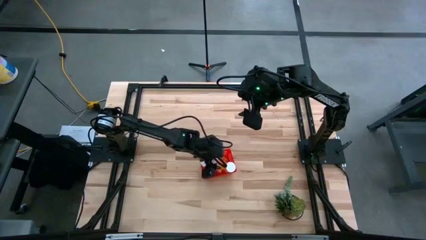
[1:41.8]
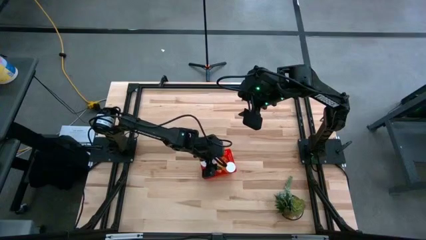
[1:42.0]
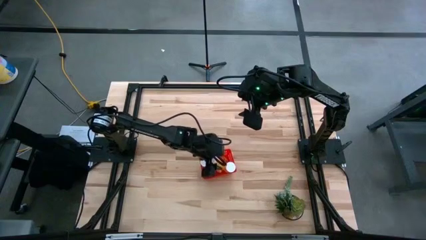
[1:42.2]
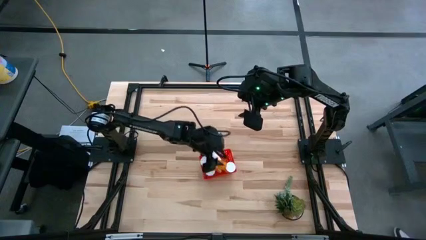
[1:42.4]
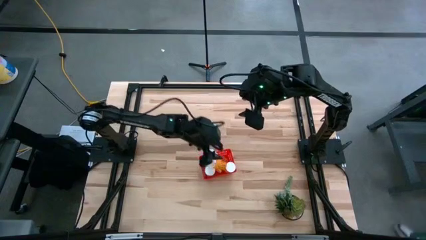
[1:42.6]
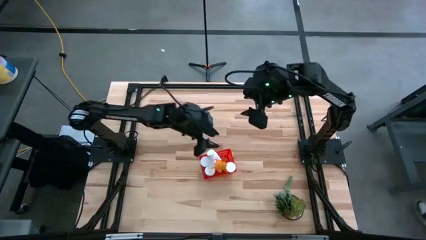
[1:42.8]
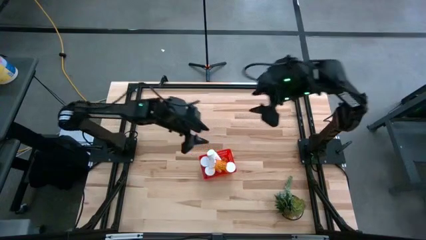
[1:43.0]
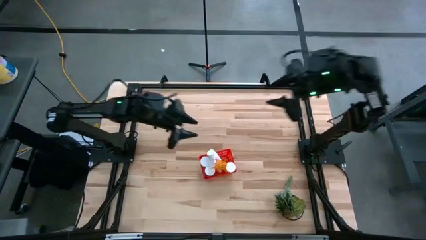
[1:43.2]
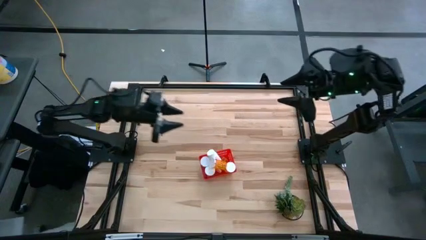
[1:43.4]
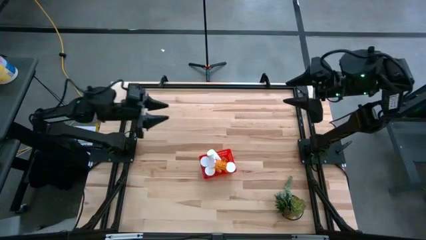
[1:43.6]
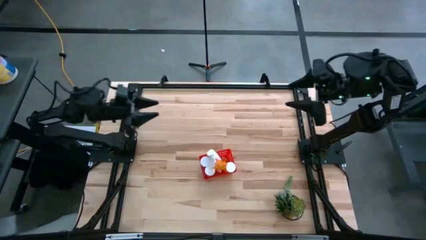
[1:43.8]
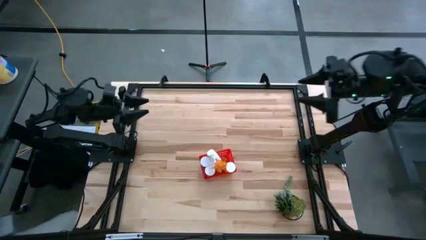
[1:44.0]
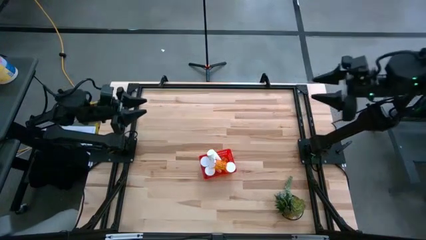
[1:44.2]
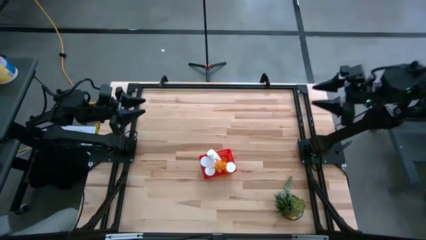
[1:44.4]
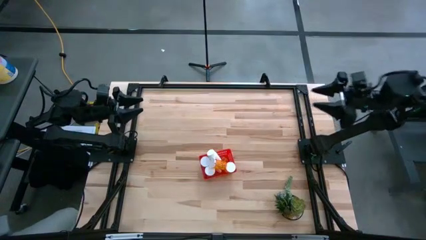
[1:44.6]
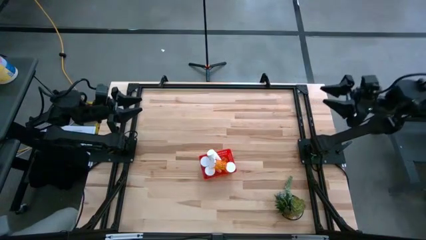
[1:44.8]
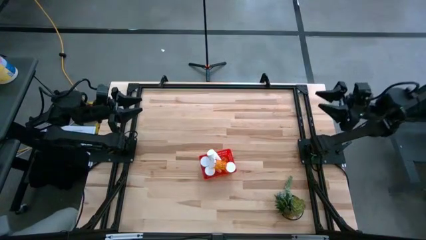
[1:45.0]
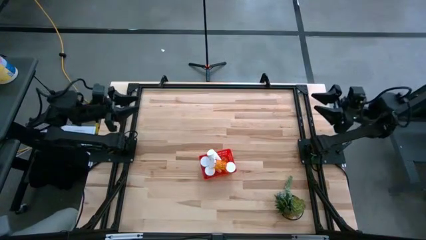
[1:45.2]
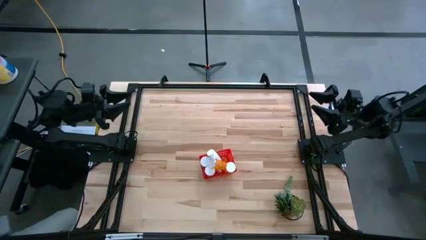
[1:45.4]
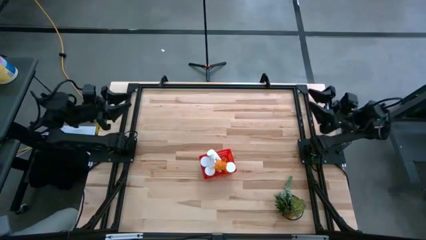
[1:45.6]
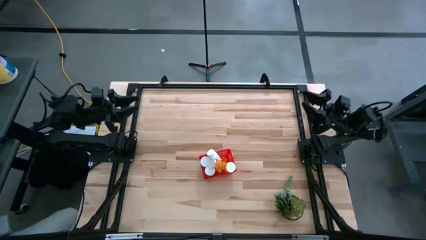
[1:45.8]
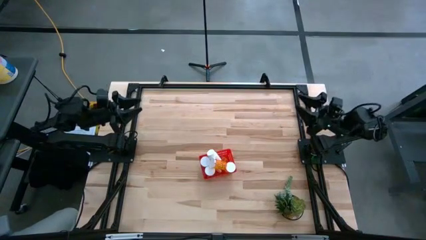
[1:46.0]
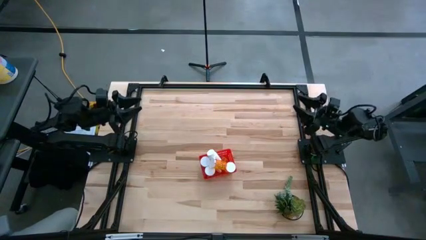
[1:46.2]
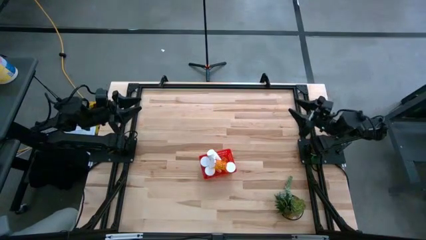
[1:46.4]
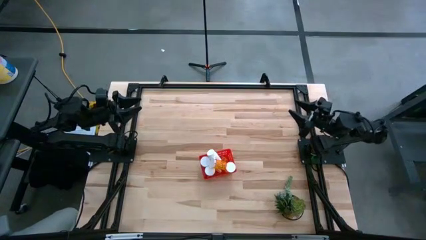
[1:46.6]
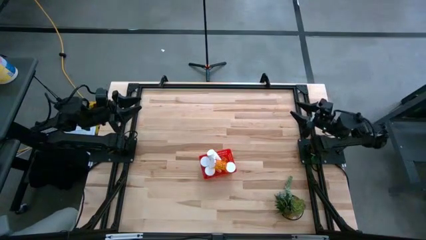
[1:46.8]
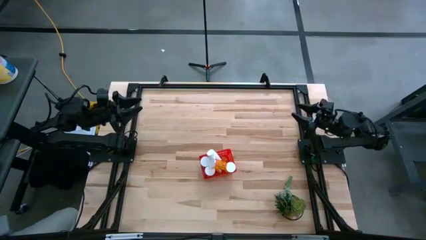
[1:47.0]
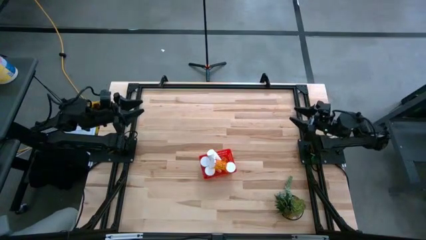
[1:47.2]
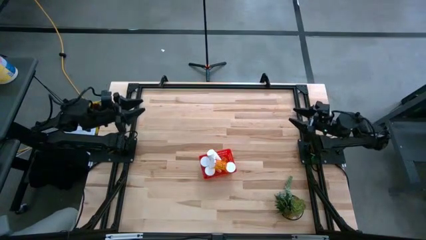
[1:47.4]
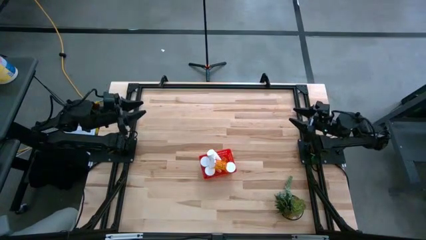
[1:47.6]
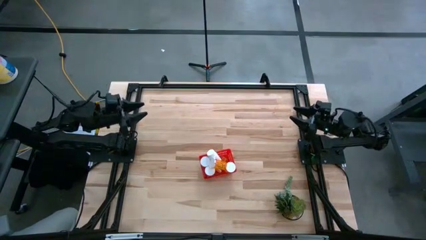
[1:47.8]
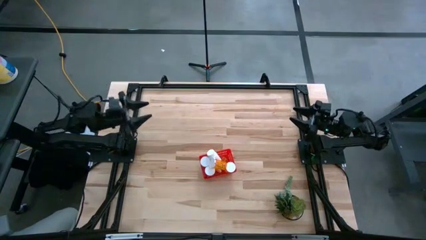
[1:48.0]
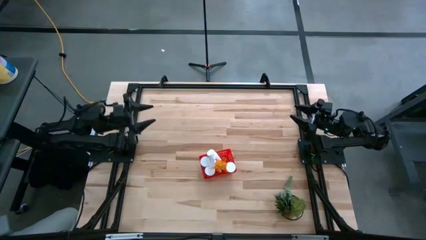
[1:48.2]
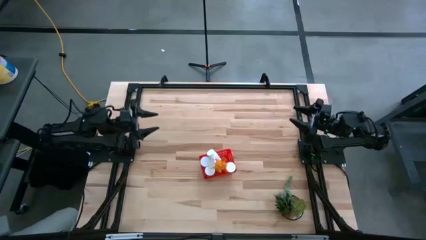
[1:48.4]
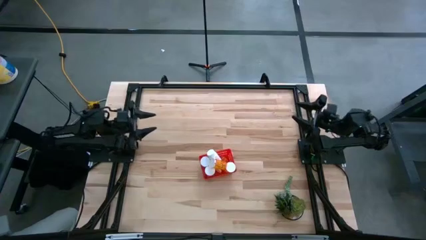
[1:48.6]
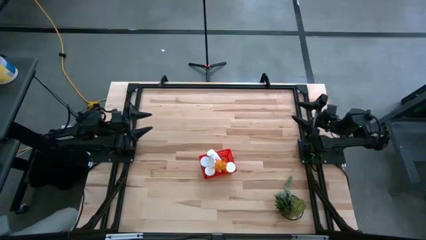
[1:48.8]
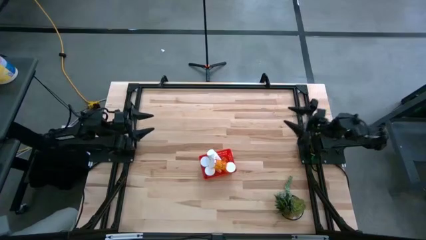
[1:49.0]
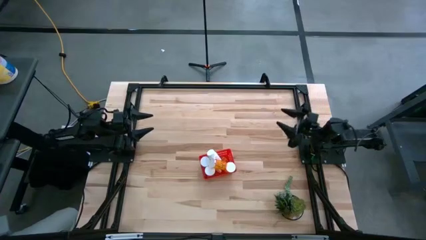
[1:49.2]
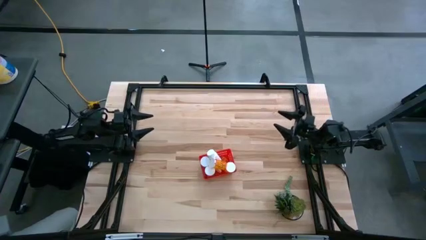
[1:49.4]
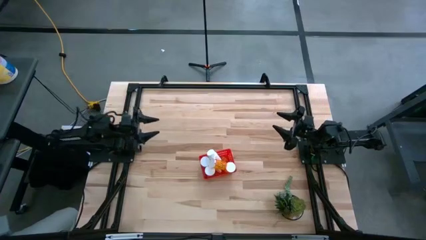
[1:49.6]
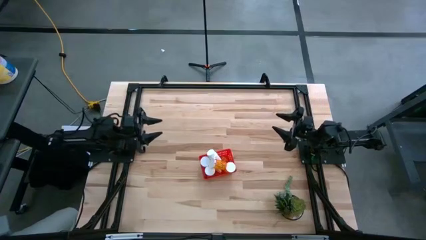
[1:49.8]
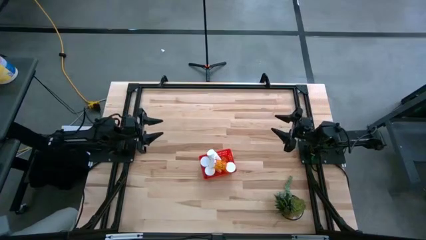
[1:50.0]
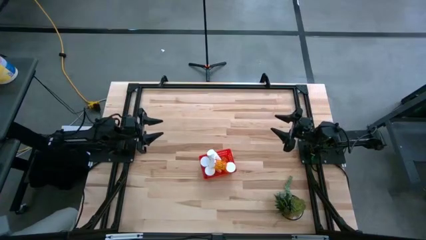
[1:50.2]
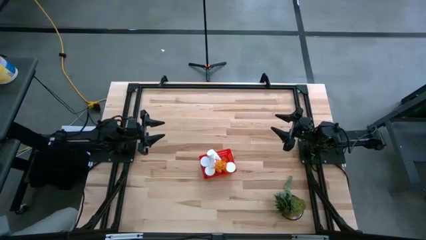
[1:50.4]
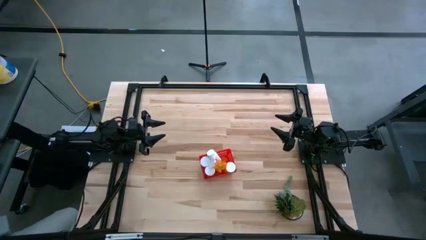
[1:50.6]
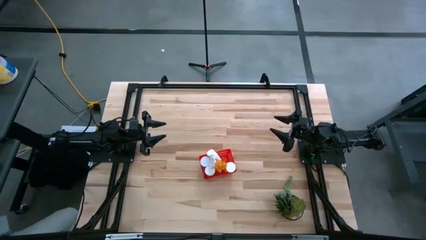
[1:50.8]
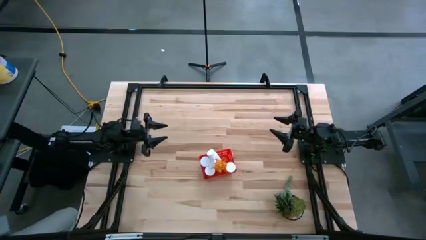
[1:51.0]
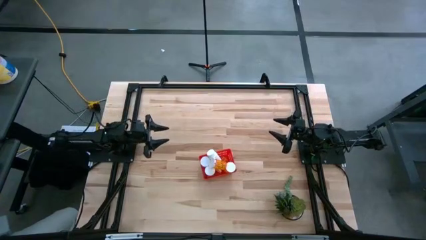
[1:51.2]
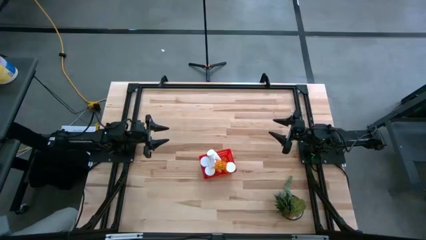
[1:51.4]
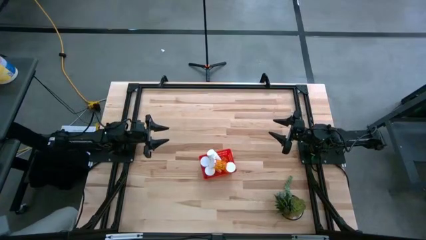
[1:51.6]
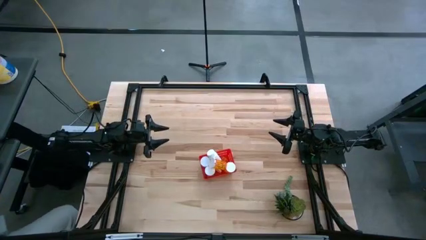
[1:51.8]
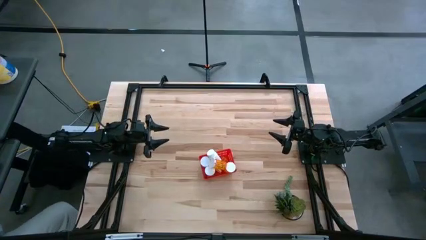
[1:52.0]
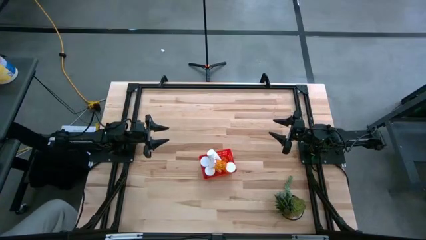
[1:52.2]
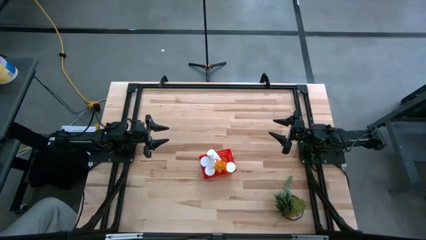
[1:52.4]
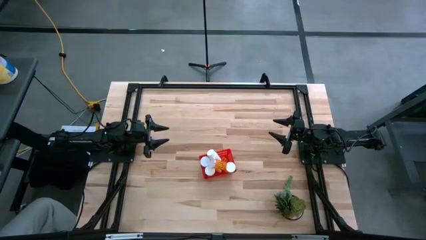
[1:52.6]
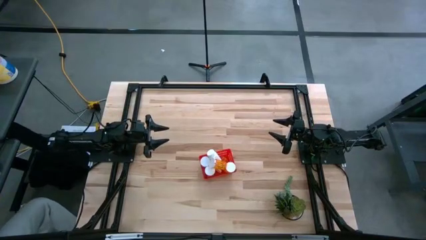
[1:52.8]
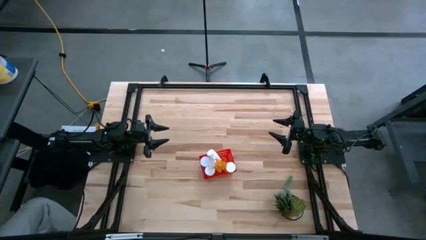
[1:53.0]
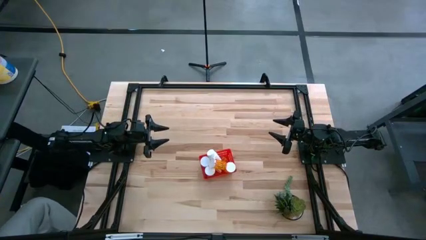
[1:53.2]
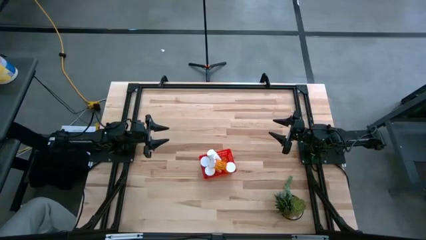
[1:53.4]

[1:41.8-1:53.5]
Task: Pick and place pill bottles into a basket
Return to Home Position

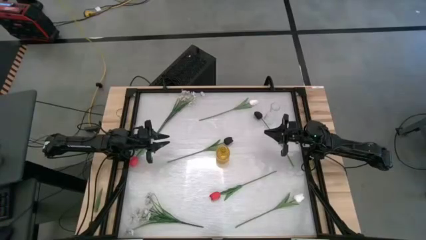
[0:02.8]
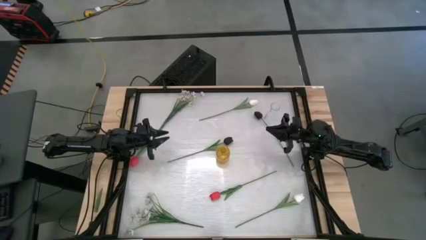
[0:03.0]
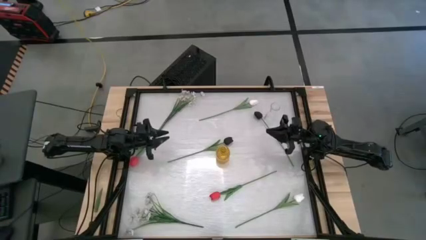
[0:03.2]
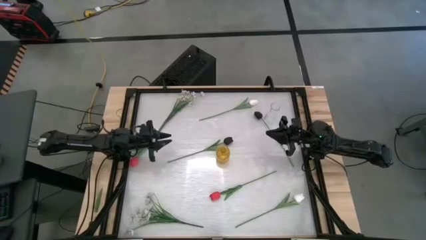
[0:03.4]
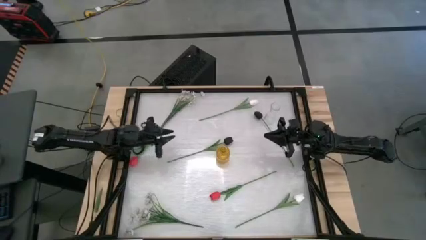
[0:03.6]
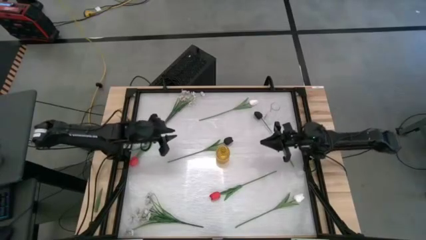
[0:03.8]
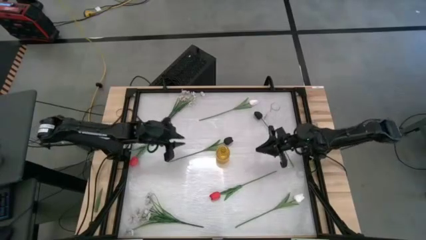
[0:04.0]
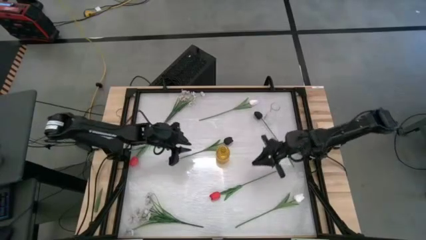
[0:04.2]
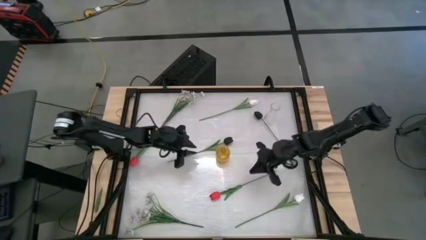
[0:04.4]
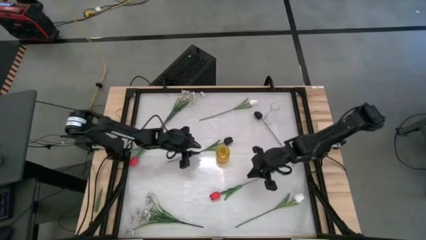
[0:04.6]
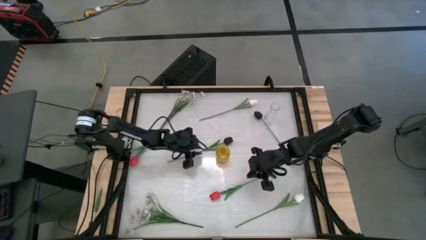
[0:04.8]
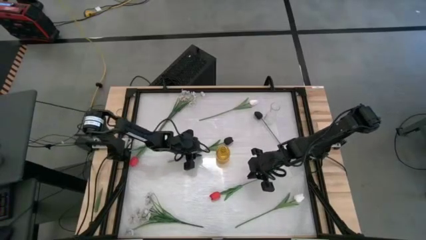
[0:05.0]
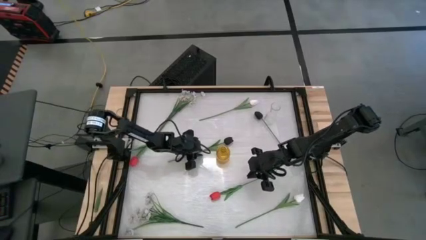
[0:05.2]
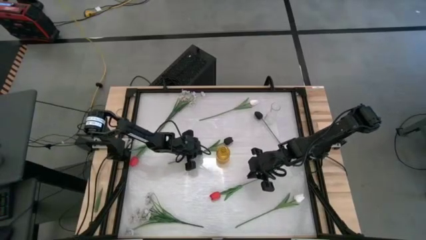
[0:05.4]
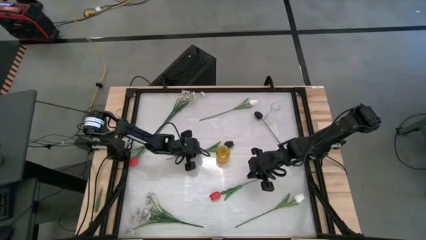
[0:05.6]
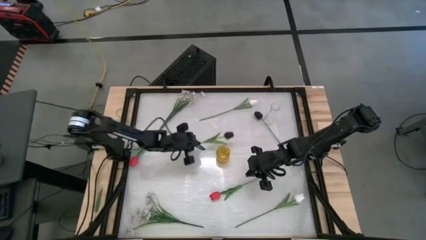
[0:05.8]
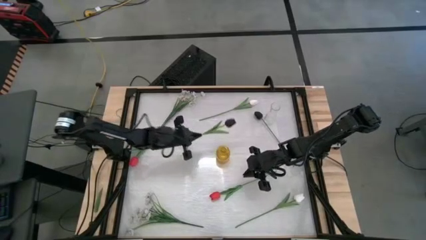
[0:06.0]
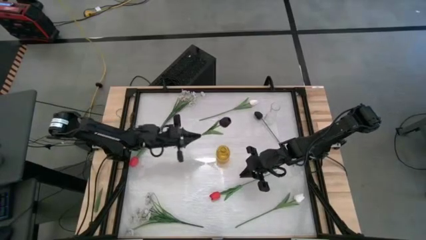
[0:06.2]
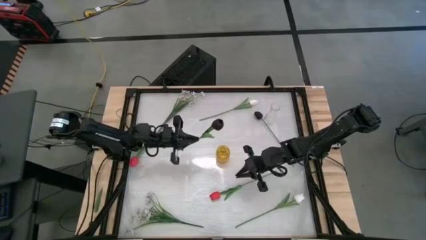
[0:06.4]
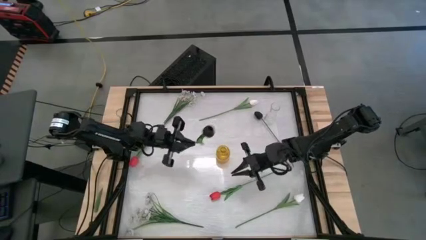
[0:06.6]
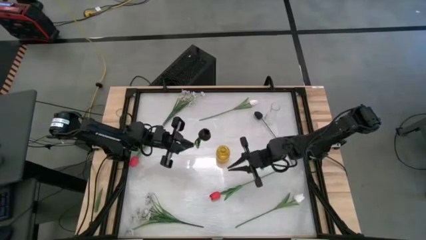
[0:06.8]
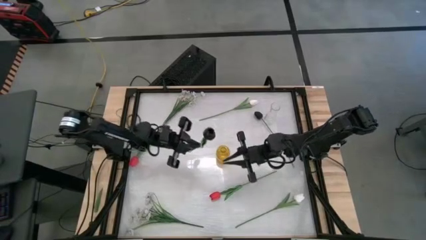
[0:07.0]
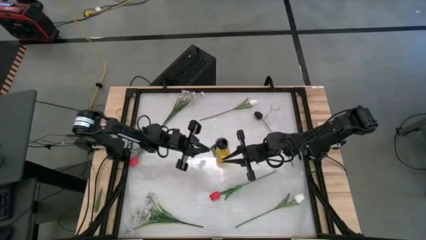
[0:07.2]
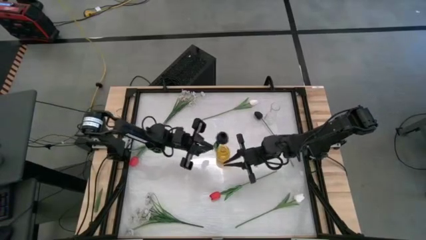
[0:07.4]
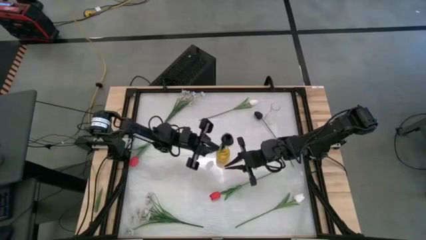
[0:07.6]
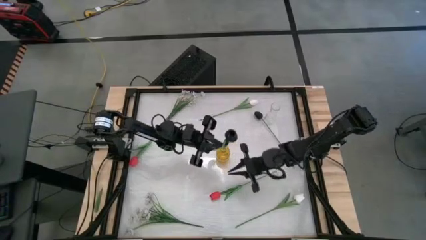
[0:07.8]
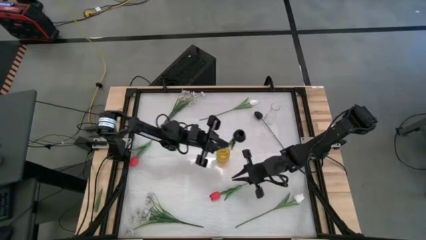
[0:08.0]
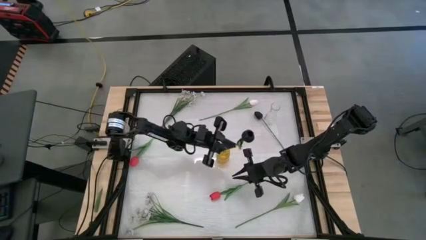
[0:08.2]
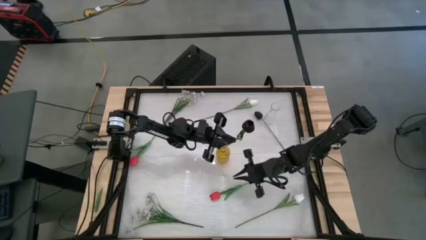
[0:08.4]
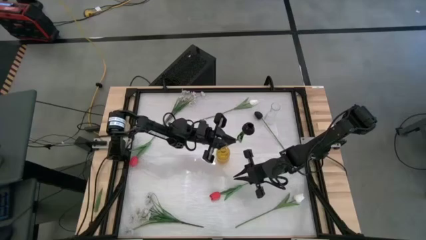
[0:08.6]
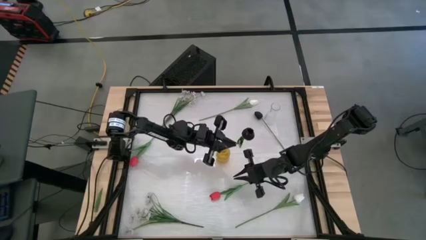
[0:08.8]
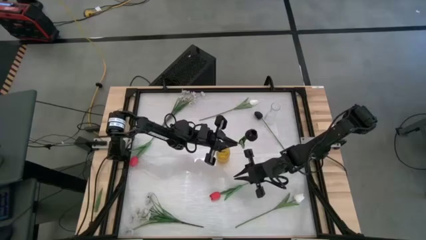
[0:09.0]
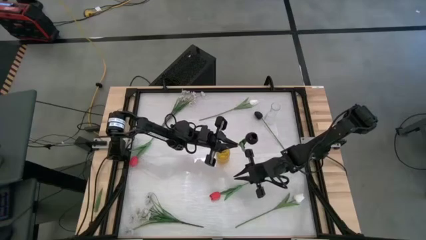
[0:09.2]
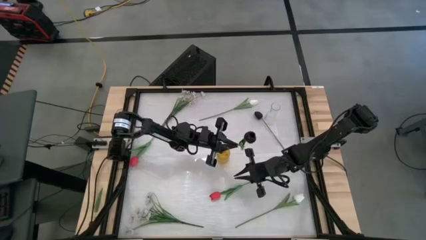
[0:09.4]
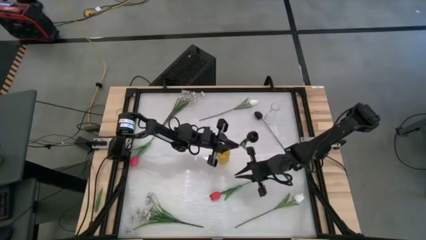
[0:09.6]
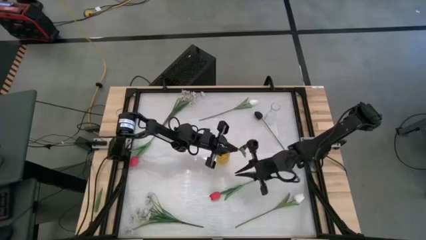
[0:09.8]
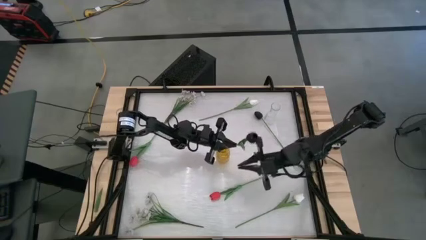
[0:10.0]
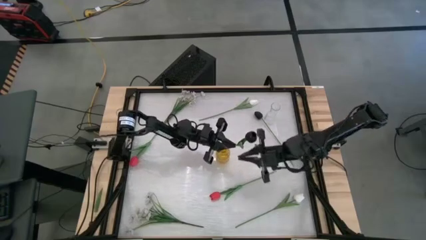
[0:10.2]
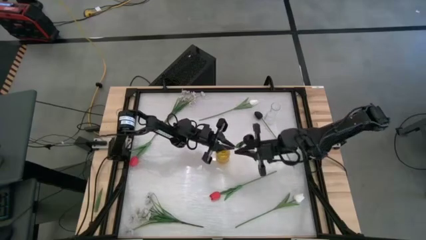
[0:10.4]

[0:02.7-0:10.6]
Task: Sort flowers into vase by color
Put the bottom black tulip into the yellow vase
